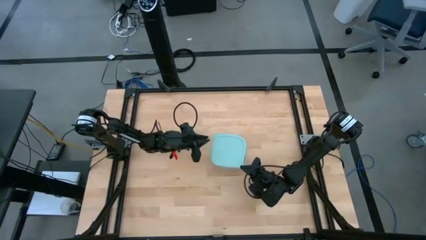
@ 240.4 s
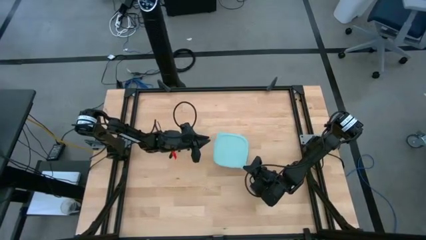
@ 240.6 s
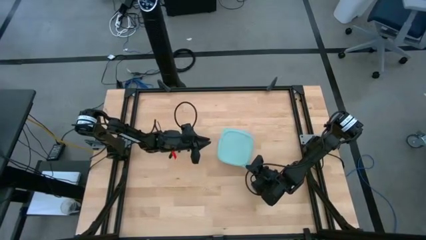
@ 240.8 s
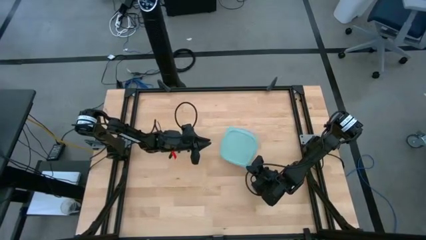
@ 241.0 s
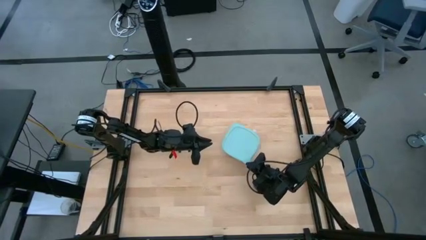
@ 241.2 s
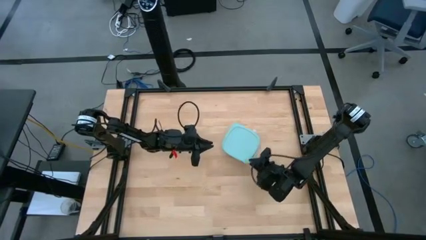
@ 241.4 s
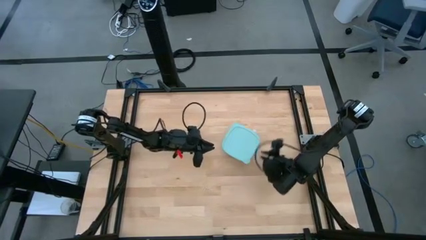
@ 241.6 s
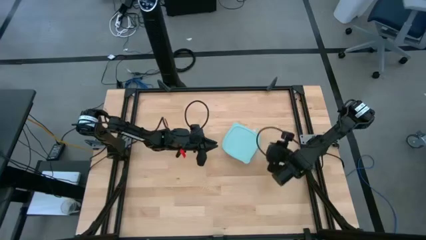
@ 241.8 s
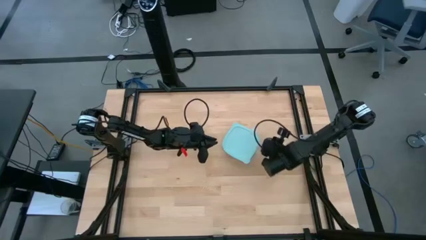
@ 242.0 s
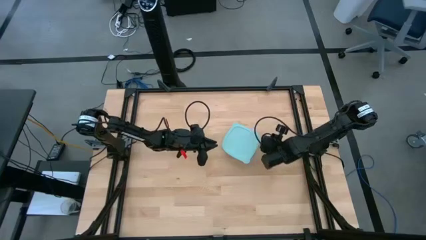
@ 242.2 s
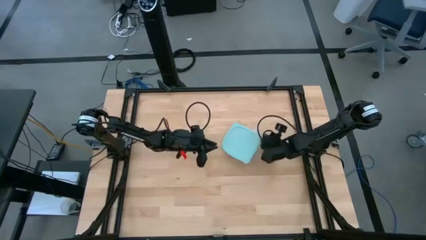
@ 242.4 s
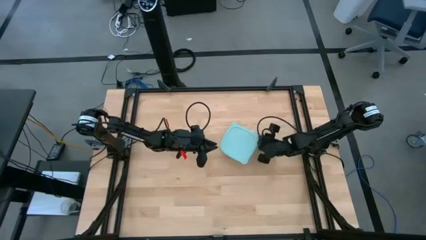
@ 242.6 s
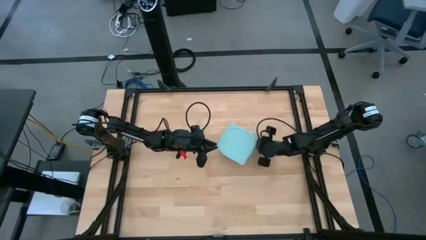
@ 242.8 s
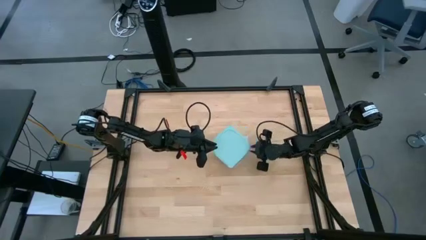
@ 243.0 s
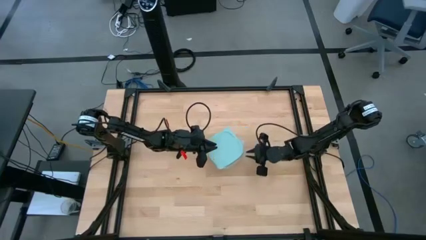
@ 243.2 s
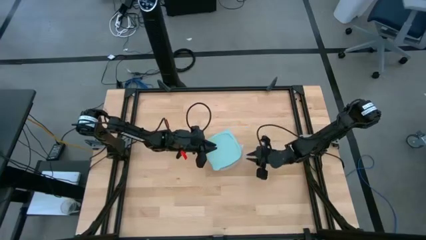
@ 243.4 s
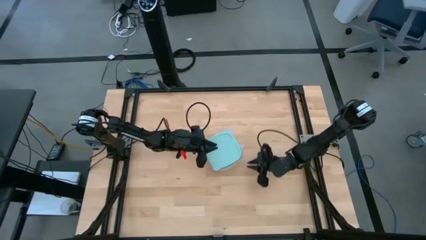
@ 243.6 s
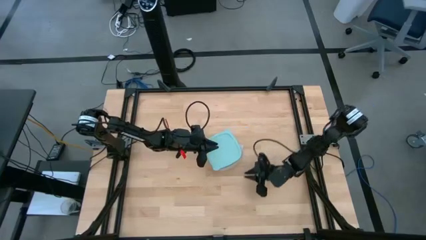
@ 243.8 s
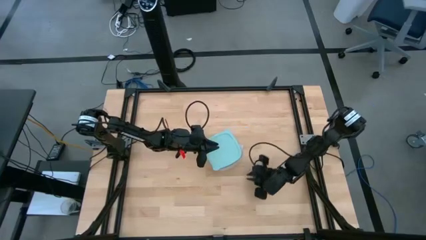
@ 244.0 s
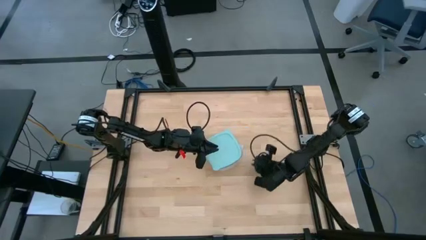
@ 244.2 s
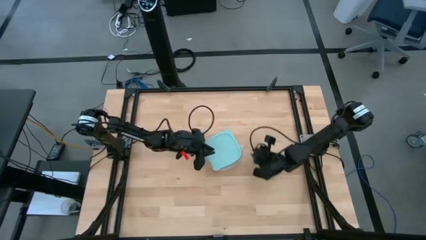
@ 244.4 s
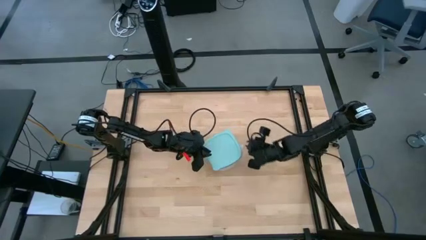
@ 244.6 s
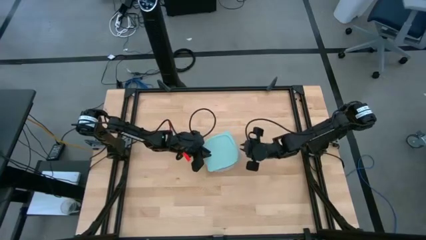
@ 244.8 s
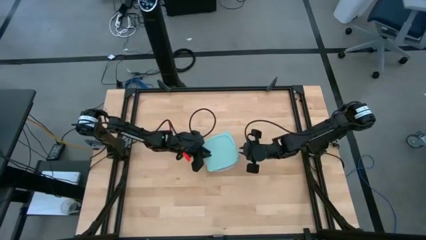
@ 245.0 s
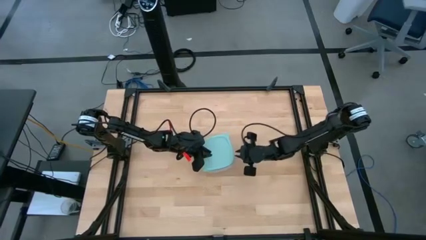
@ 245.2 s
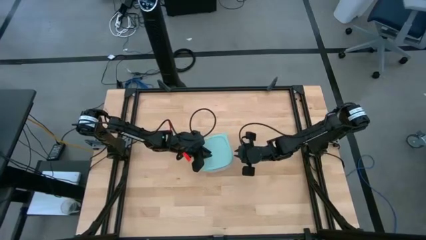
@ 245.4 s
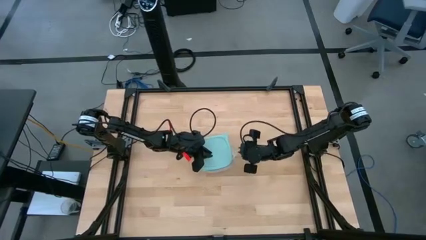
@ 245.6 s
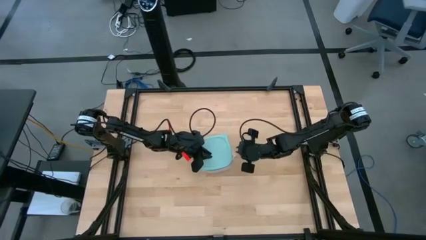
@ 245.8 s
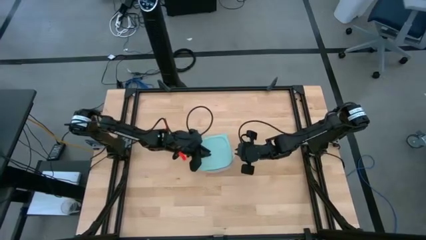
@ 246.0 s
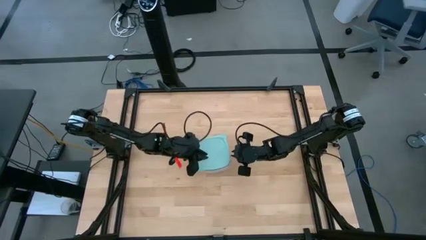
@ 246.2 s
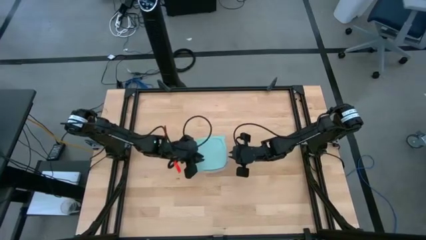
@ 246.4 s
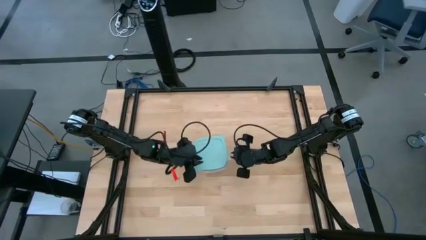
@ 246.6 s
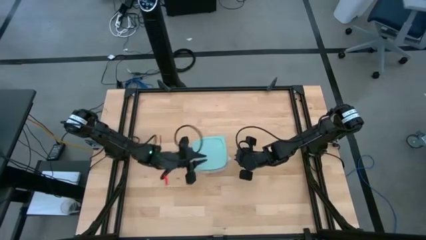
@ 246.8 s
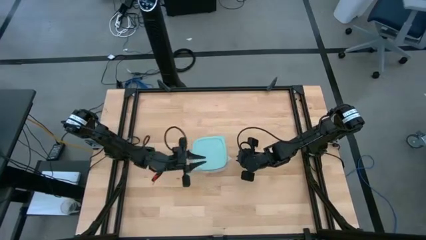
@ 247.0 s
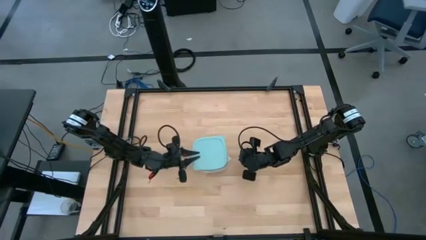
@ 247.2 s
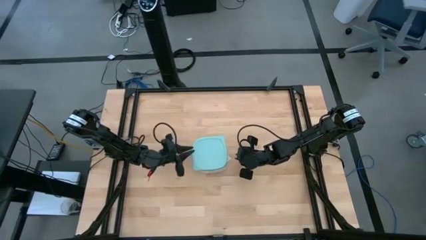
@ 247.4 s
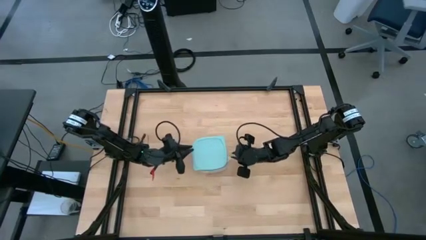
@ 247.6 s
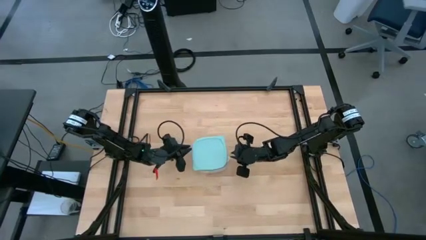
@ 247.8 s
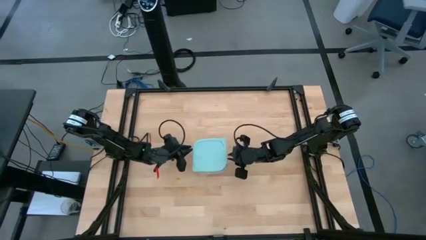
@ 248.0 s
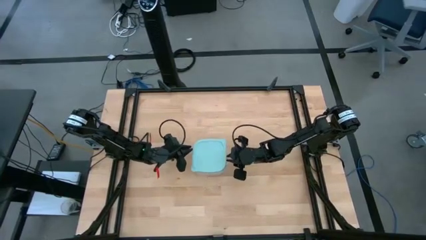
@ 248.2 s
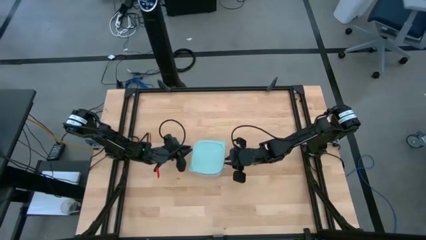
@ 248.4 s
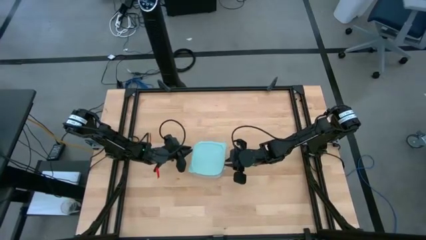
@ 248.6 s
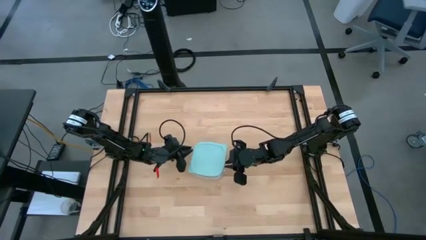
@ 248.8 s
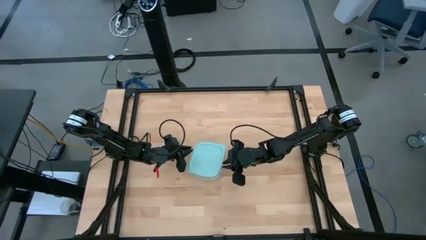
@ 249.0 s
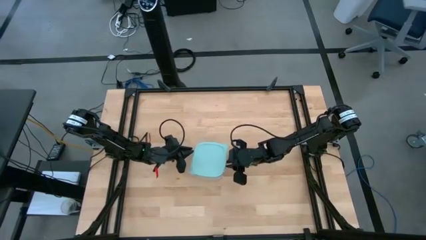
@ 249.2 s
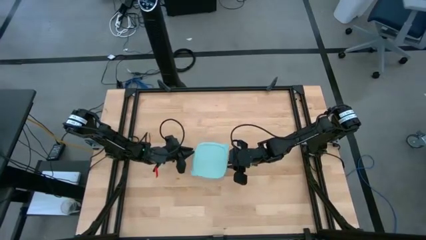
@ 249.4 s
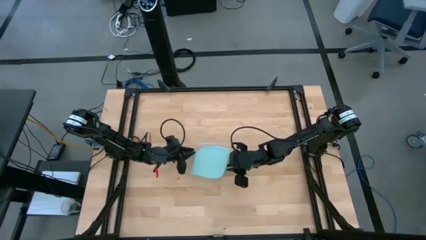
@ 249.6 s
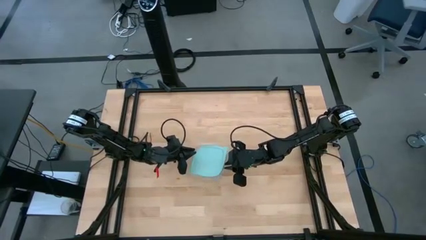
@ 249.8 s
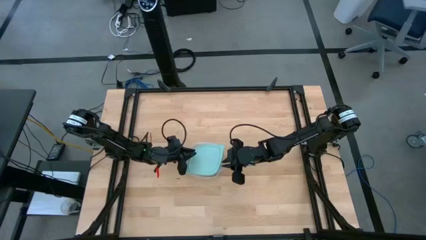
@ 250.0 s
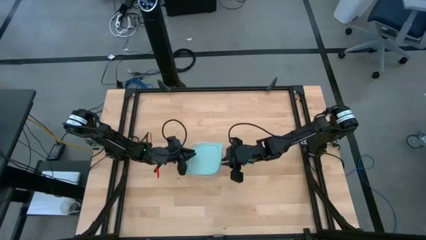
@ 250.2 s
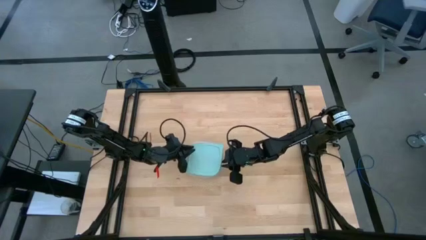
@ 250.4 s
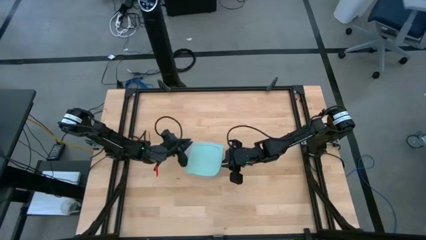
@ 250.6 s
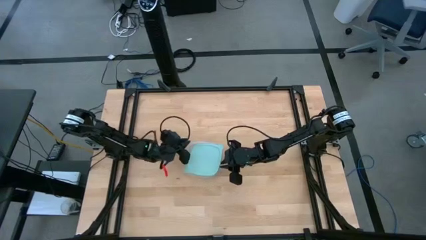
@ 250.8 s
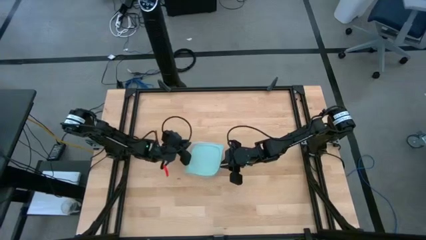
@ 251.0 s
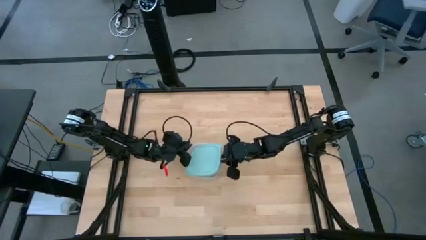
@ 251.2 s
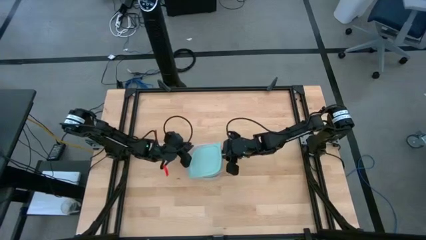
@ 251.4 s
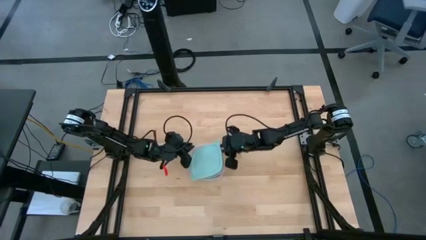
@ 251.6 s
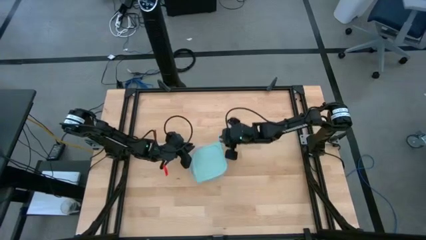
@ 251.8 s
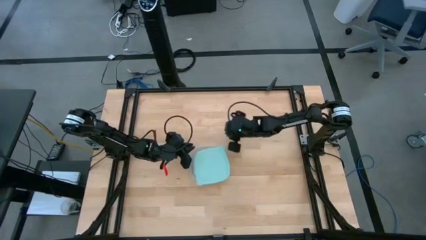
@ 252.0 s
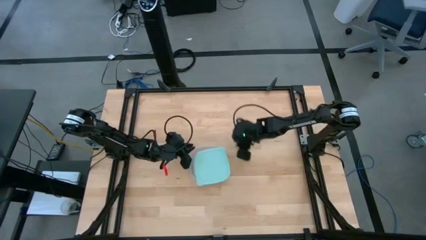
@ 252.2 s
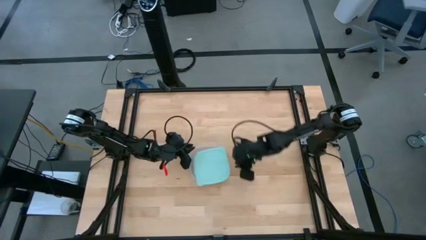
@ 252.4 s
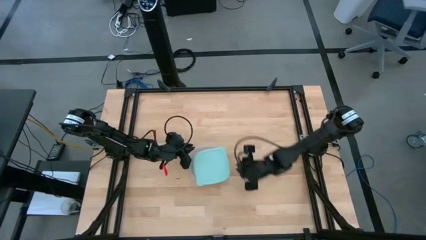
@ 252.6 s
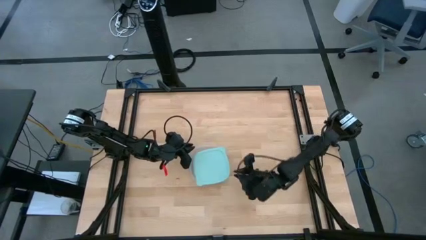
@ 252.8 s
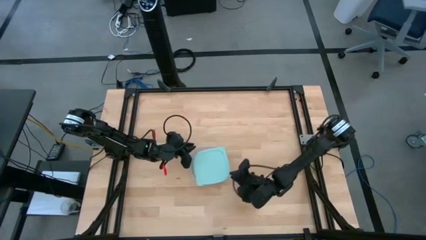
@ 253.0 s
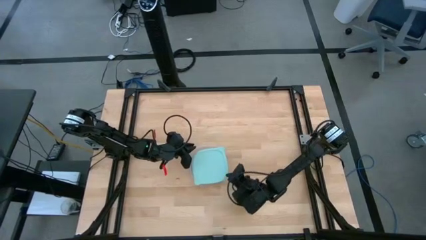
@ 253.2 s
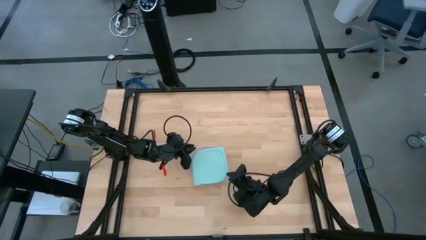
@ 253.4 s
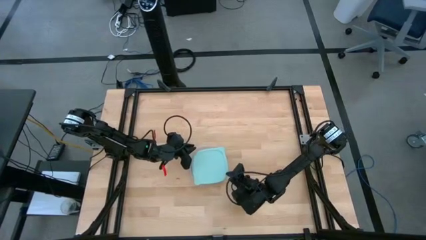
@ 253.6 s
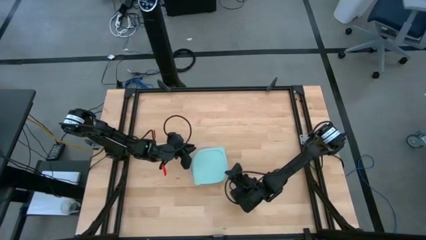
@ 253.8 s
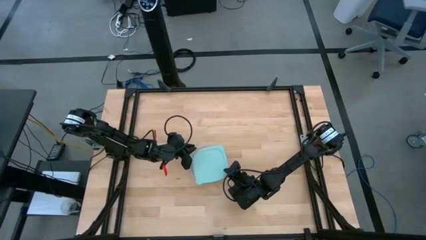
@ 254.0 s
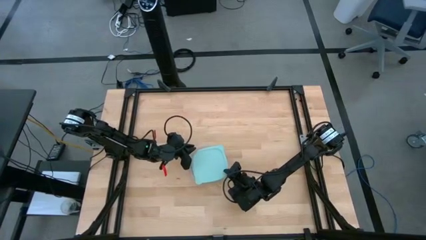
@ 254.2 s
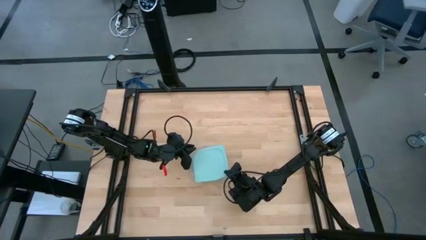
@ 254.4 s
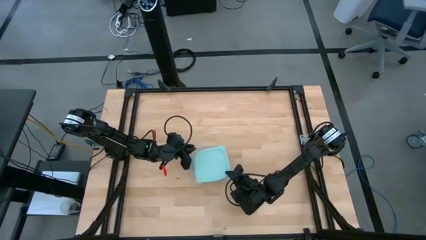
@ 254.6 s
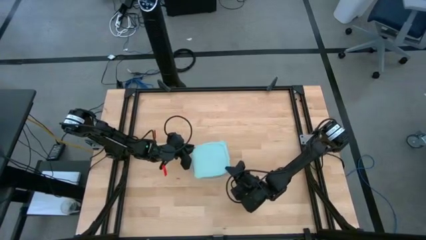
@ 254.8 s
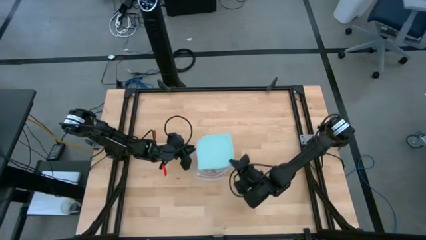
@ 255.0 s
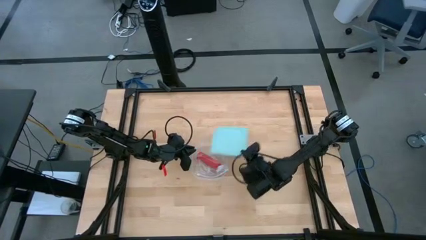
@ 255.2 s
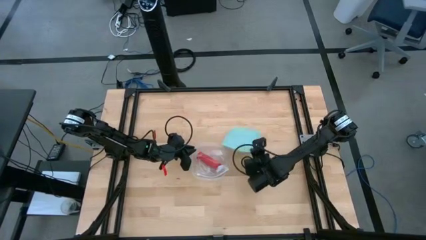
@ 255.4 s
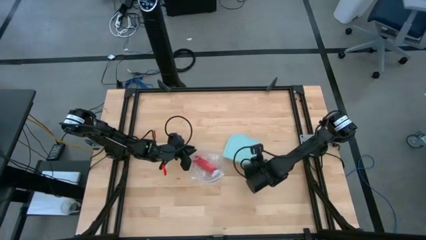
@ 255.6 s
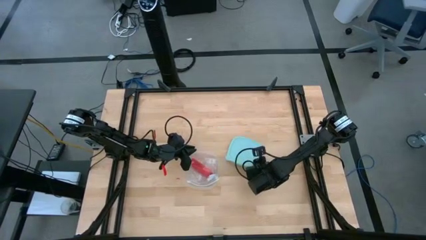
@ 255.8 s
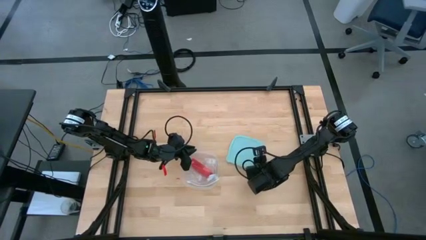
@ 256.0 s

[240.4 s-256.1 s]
Task: Roll bandage
Close the transparent tupperware

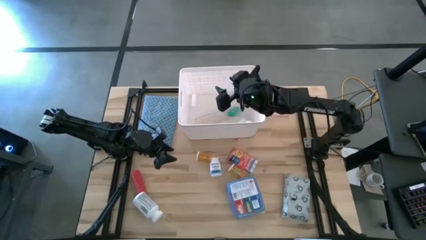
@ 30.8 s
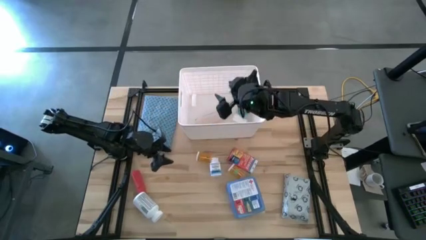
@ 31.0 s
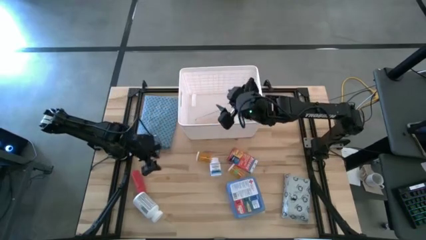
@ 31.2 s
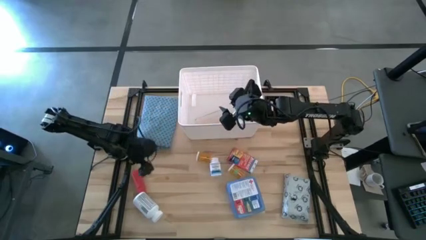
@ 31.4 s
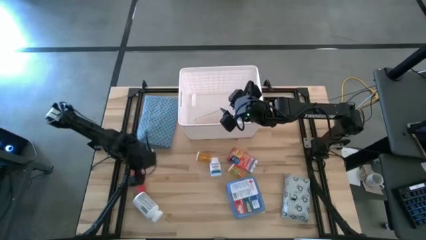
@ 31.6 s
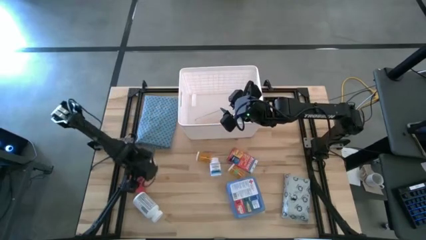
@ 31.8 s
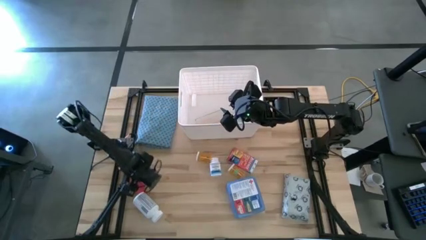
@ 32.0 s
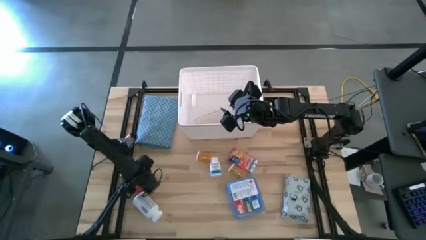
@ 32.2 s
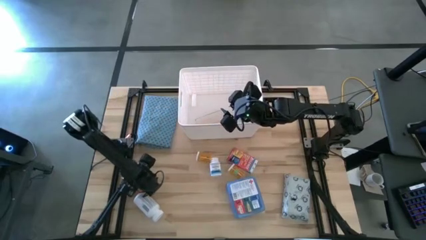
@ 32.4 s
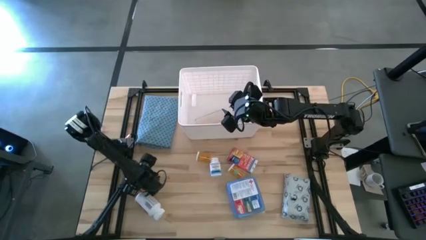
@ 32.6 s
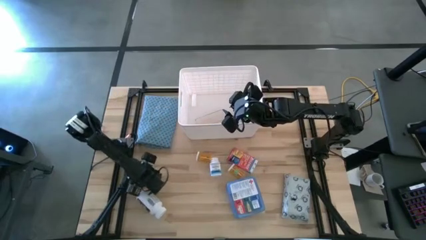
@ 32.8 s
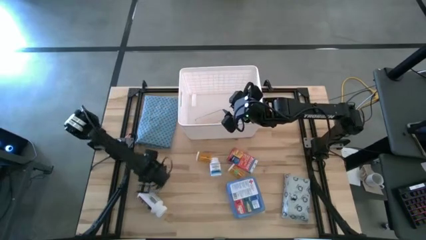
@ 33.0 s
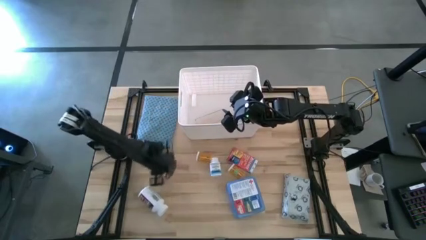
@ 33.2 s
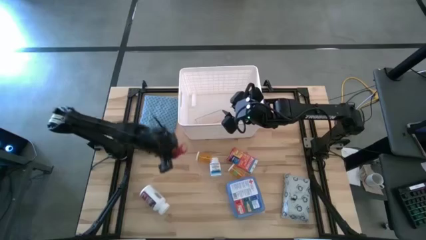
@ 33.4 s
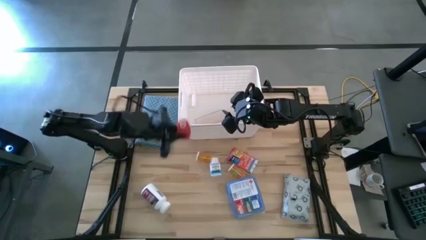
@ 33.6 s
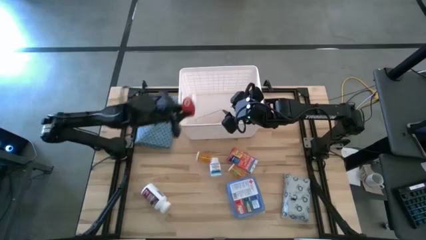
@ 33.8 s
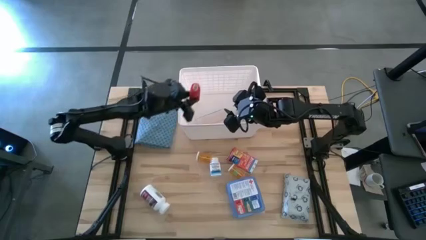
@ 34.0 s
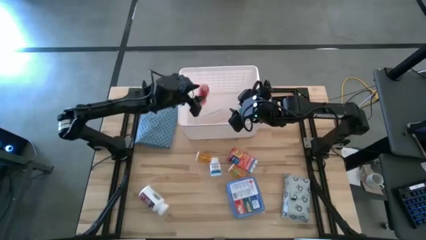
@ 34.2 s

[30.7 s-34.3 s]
Task: Pick & place medical supplies in basket/bin
Put the red bandage into the white bin
